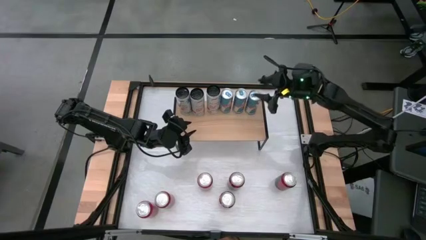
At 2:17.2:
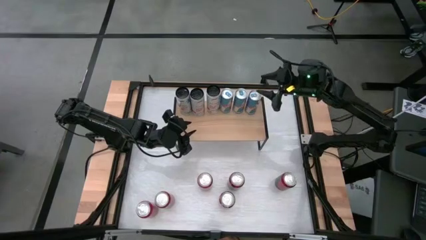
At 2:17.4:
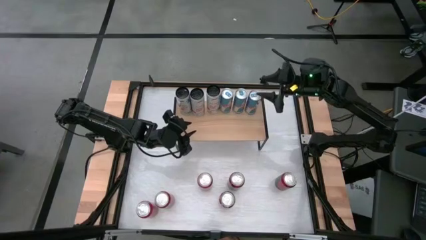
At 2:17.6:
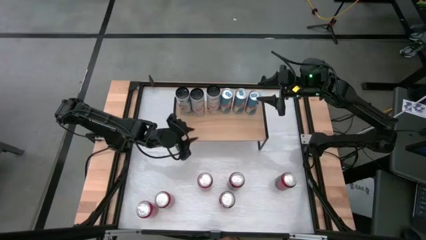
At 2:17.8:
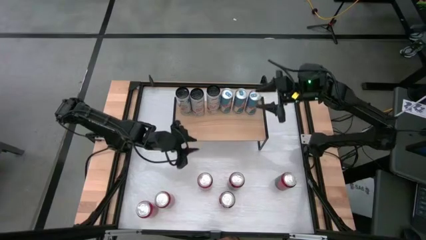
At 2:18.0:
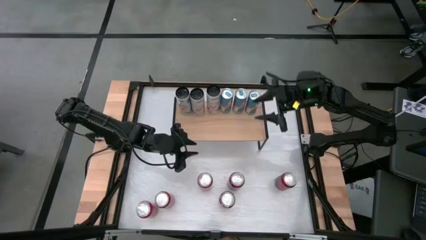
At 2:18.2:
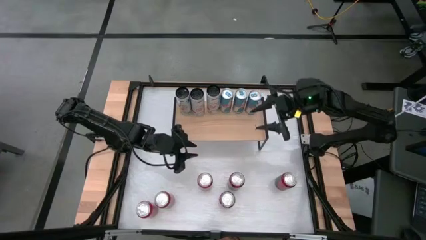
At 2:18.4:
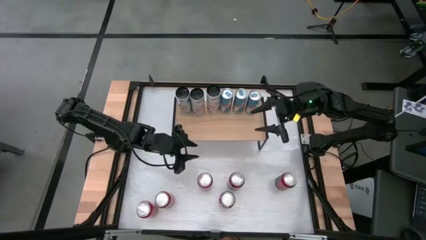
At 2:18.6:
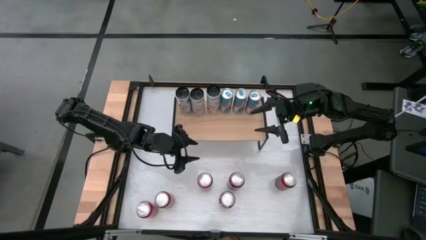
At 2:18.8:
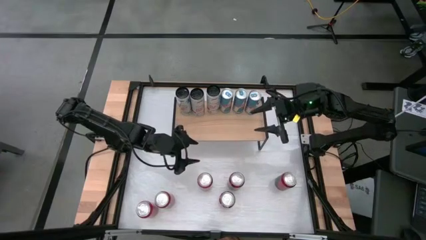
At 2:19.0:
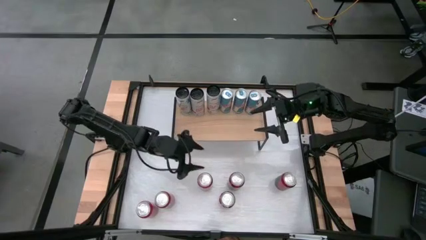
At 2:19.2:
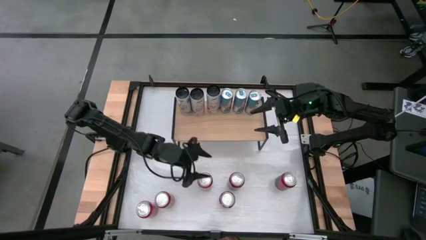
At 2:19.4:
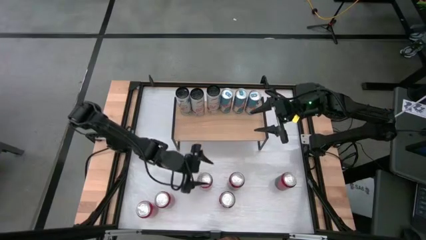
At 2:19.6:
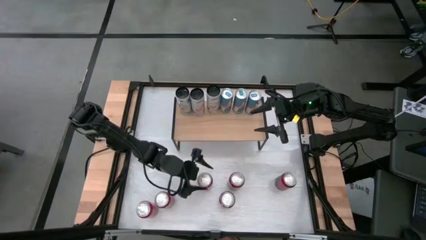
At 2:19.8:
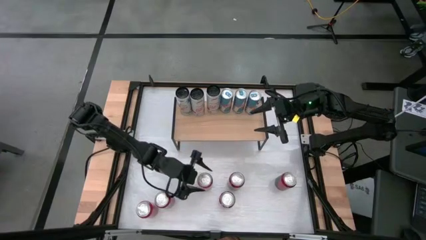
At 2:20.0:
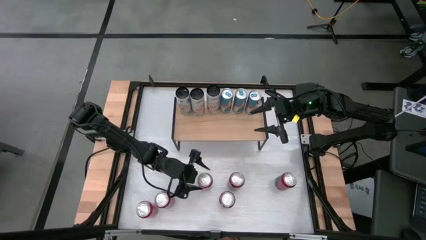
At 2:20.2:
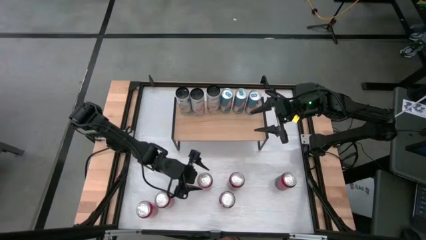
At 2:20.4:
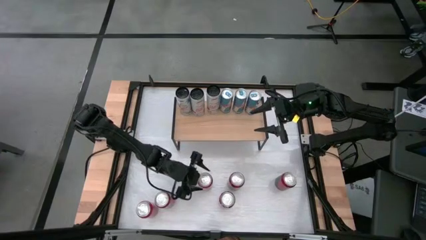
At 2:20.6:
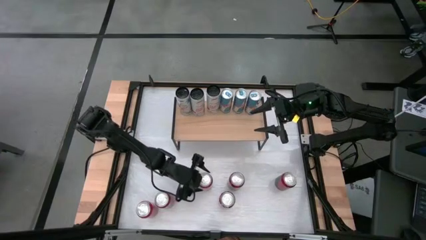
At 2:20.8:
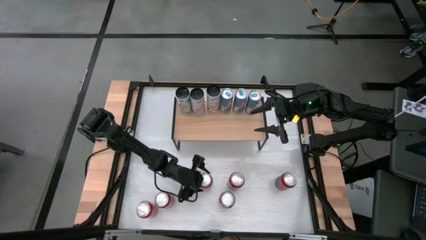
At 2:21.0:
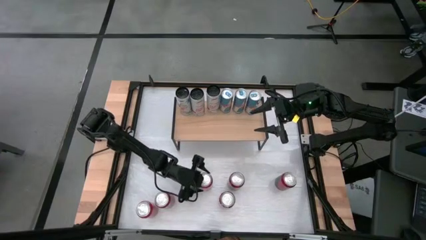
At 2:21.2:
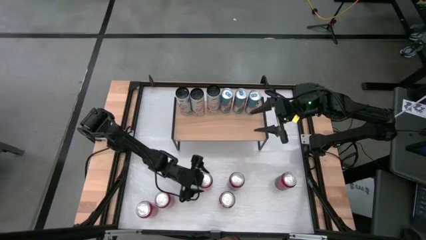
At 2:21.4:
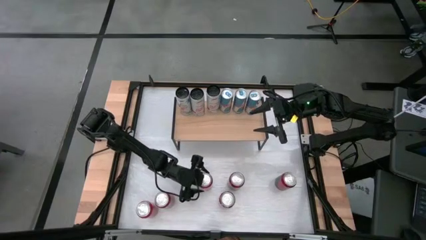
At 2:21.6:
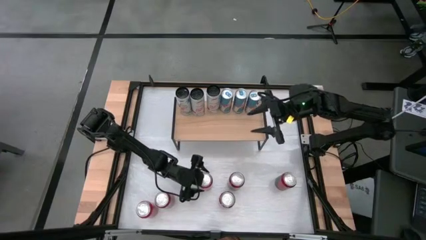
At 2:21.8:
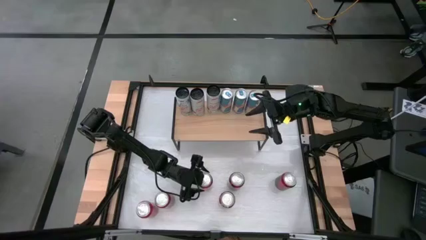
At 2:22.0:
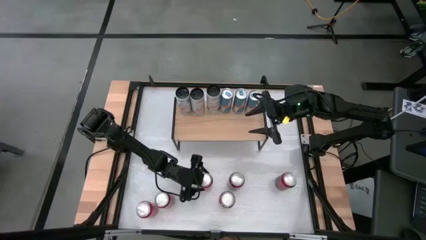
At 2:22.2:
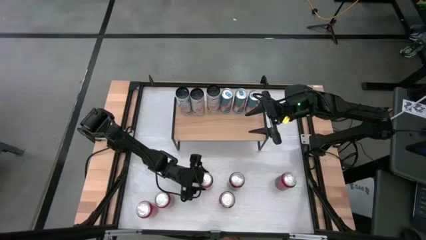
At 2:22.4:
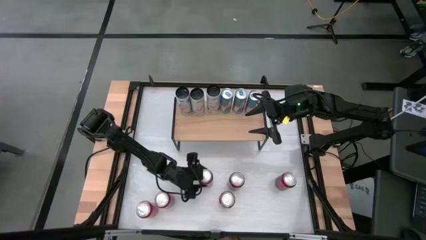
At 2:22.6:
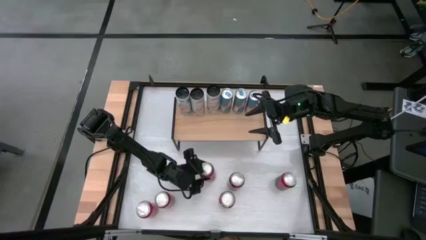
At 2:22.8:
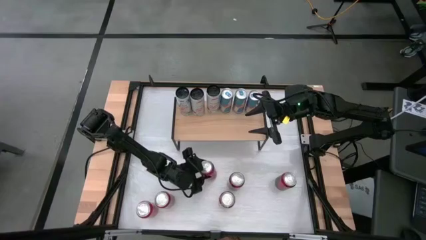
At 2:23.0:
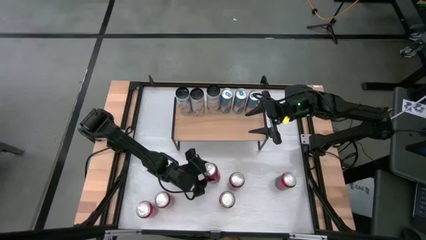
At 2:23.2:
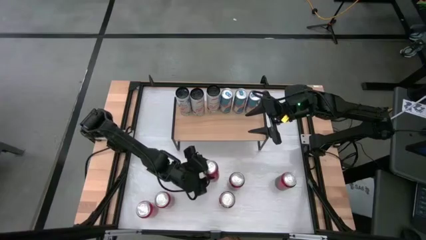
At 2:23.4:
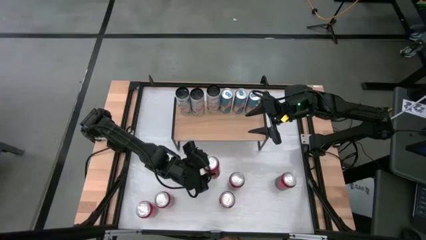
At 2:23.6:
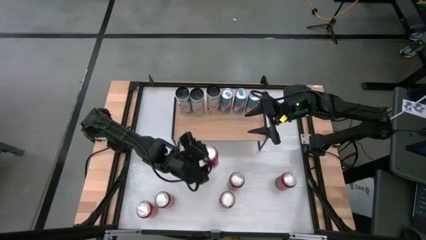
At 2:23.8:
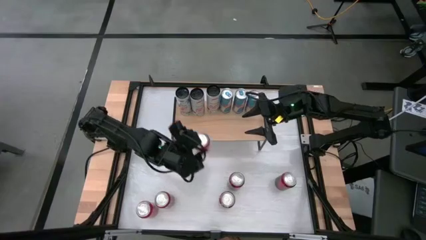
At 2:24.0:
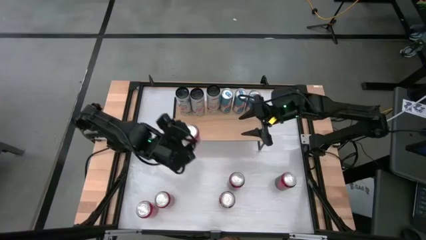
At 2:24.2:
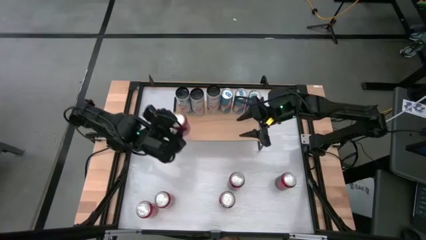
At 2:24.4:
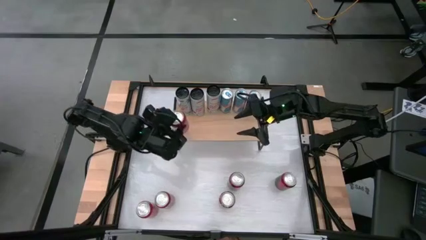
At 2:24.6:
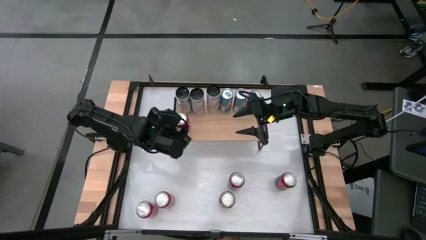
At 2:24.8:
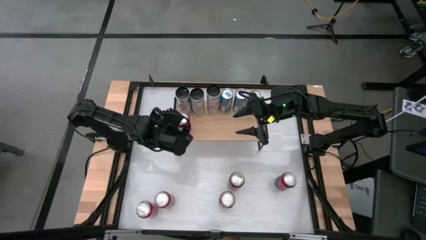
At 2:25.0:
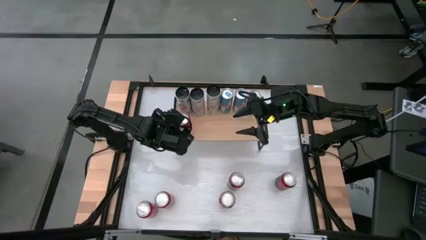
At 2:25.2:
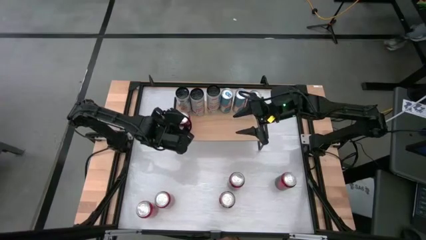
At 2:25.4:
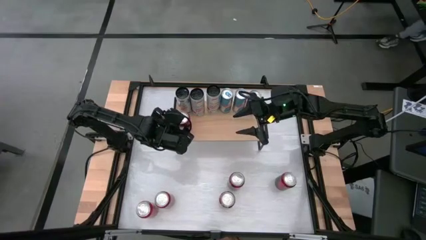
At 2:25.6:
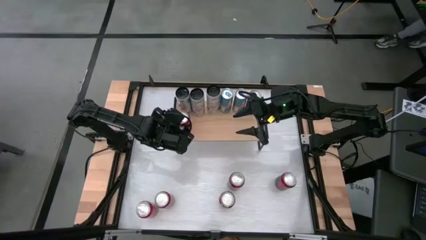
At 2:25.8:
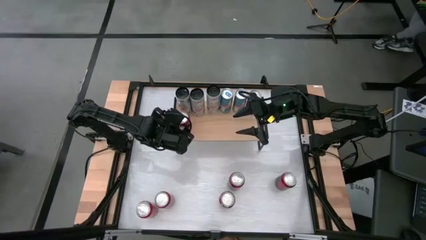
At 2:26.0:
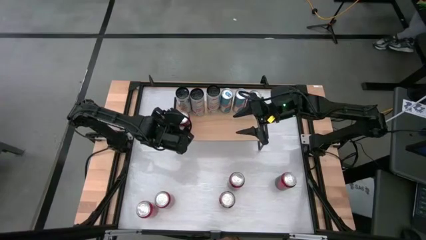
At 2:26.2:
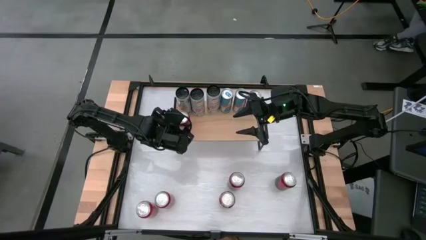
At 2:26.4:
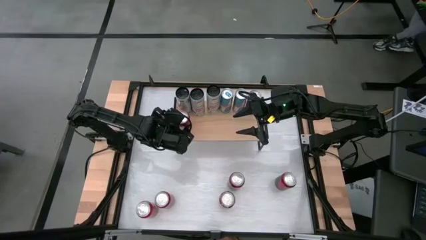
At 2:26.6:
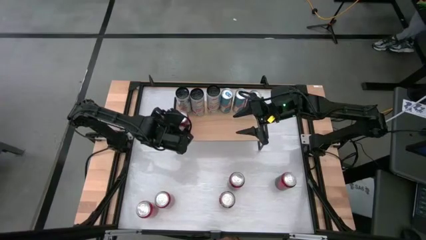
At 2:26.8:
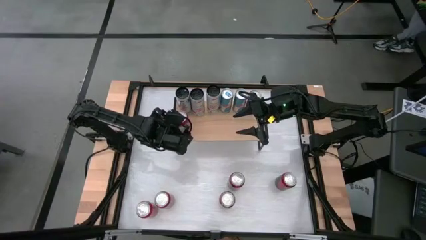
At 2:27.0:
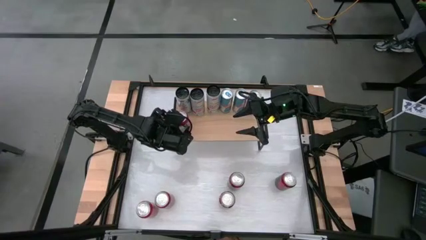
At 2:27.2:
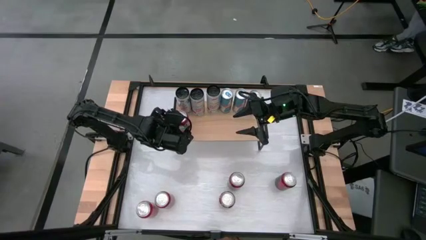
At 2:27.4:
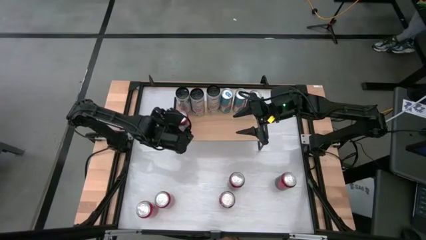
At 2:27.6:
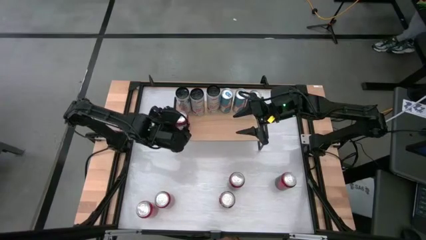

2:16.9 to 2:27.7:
Task: Place canned beverage on shelf
Put the top orange soda can on the shelf aligned with the white soda can

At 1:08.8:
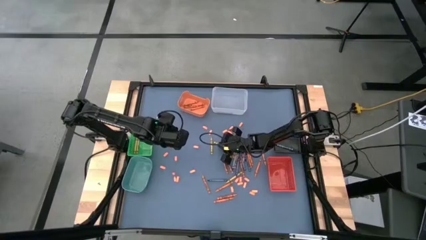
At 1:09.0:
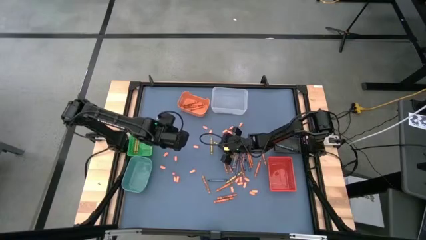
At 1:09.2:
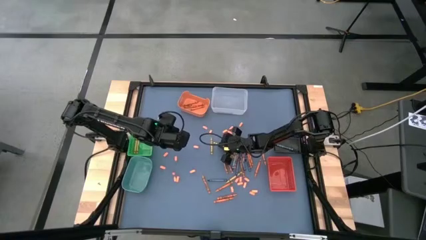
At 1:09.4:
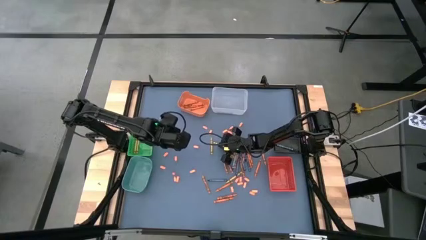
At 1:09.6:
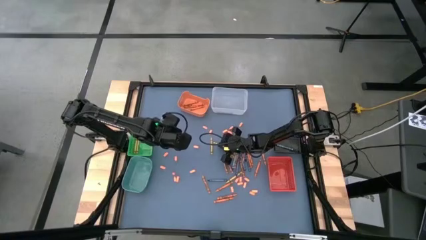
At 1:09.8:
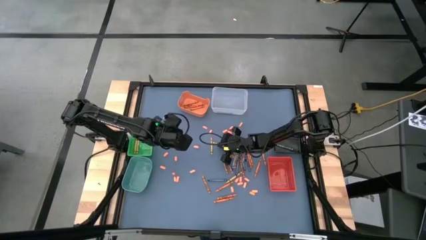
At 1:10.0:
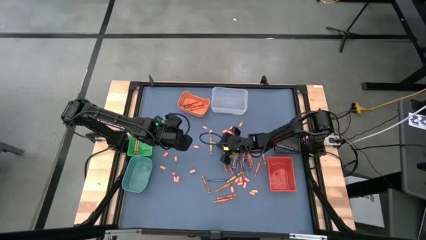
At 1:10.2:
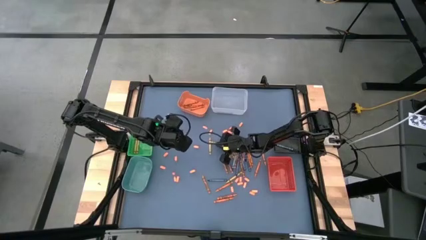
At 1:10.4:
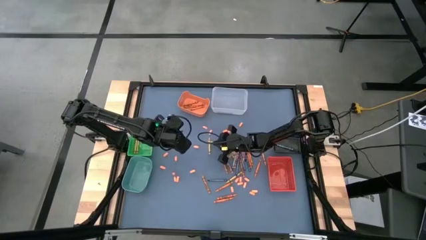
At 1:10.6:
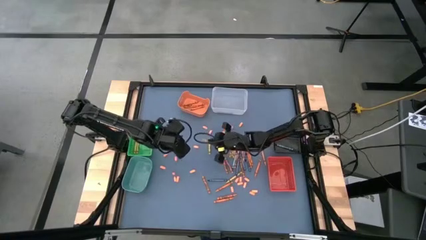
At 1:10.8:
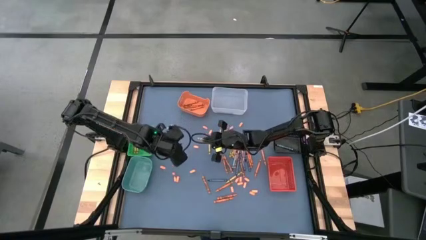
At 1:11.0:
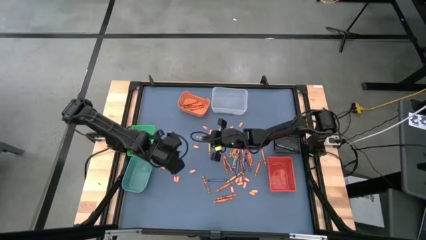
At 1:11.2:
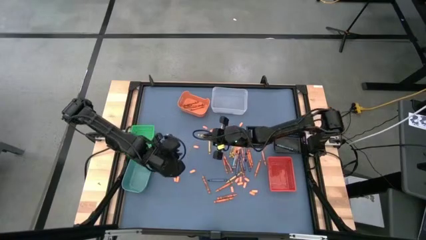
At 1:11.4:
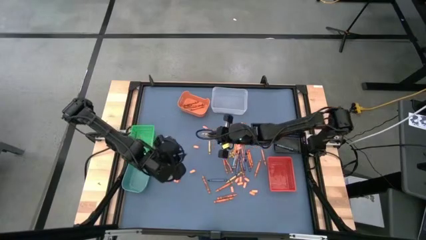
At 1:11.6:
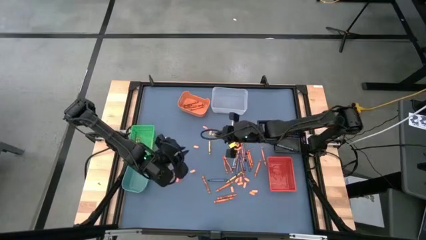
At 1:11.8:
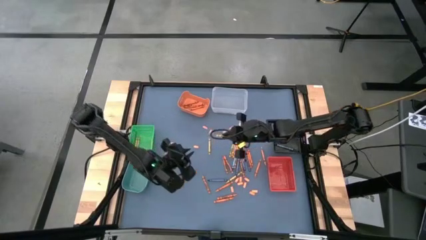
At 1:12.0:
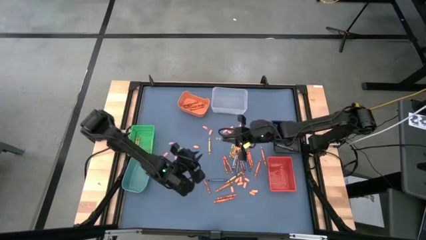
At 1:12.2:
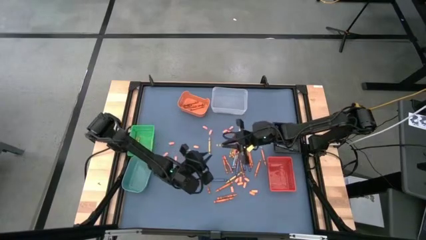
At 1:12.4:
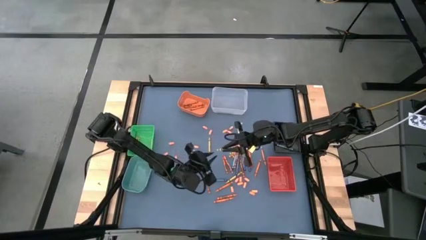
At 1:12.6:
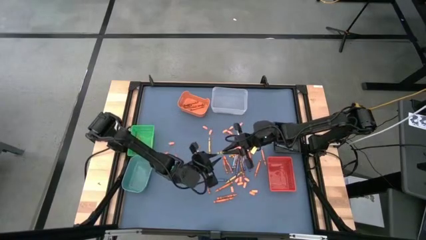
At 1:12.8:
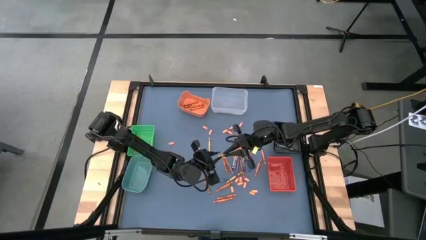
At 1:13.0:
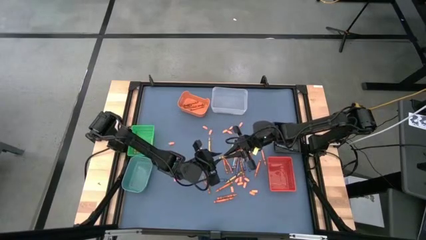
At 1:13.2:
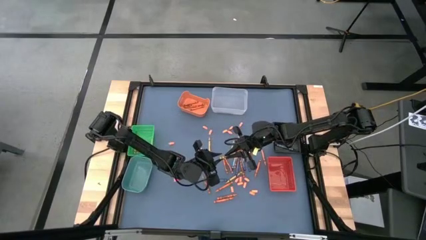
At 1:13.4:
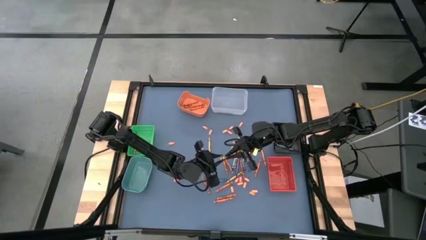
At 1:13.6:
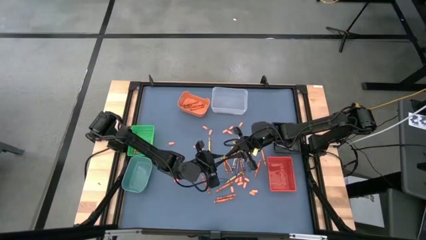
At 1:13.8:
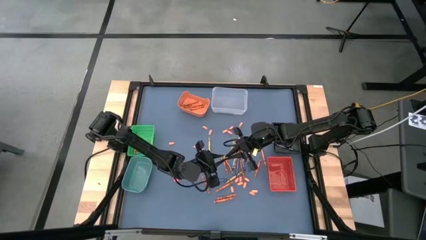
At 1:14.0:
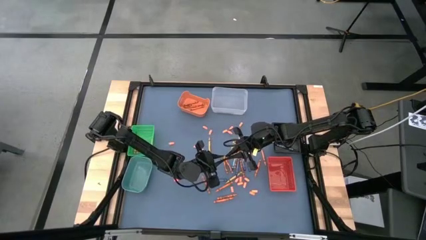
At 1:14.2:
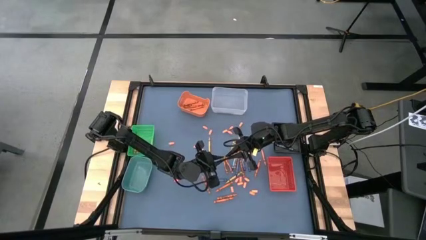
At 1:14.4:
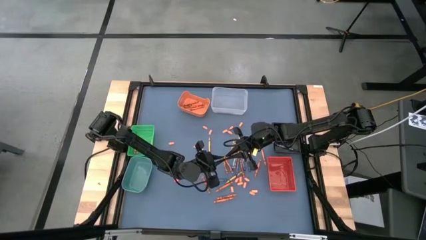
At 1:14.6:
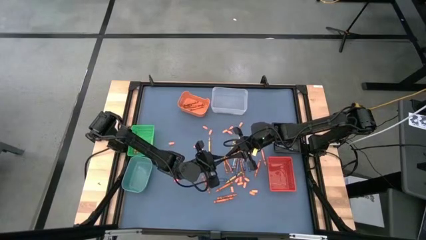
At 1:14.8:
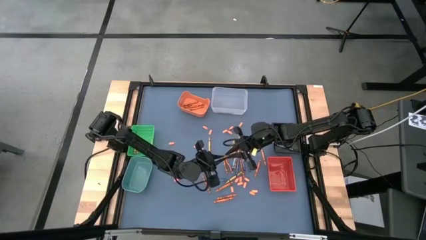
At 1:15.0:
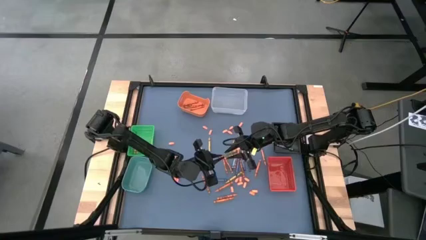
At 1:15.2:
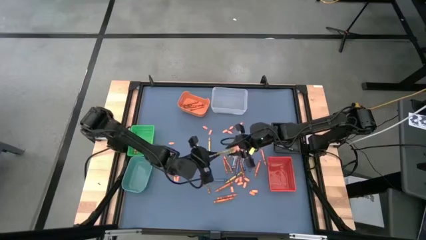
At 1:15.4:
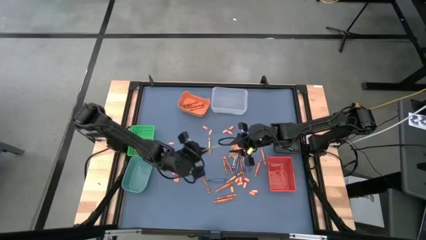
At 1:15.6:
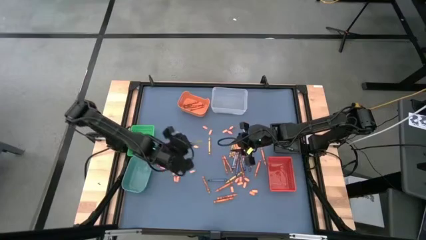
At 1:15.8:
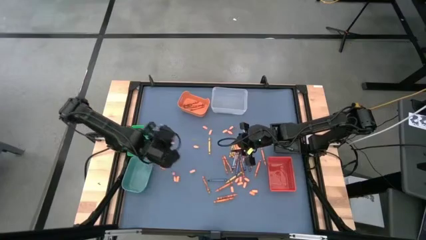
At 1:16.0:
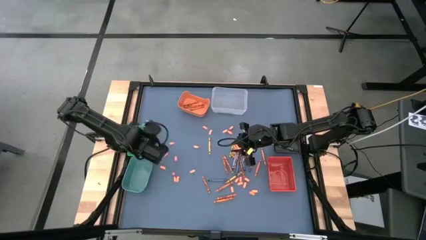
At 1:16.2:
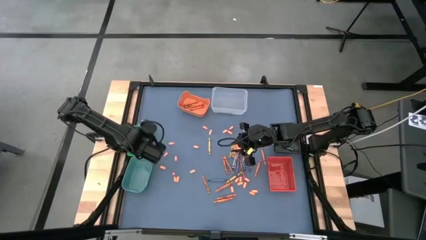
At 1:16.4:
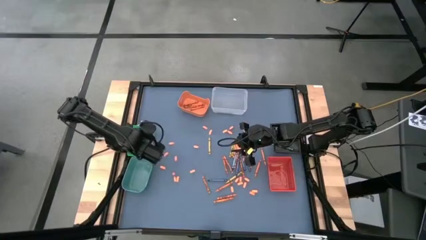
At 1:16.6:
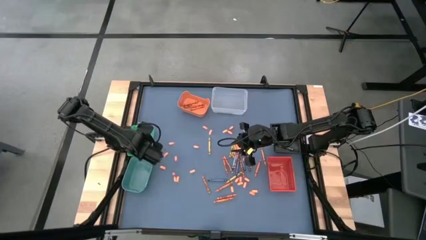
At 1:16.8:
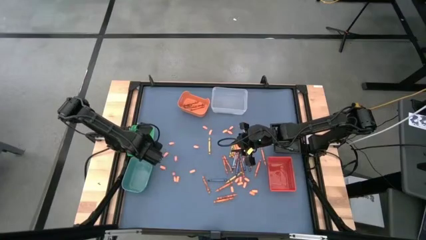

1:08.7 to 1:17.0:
Task: Sort crayons
Put the yellow crayon into the green bin
